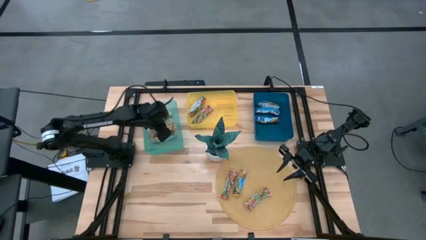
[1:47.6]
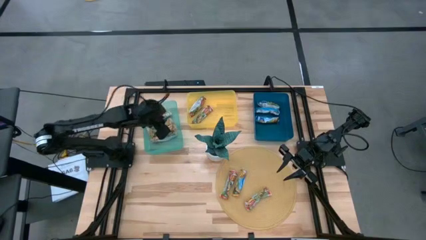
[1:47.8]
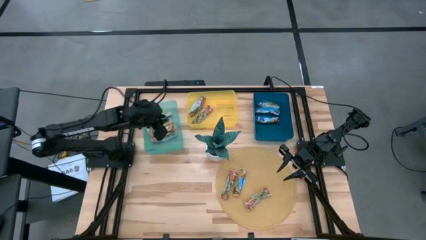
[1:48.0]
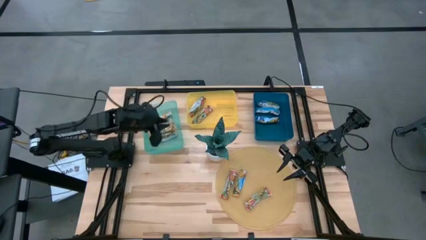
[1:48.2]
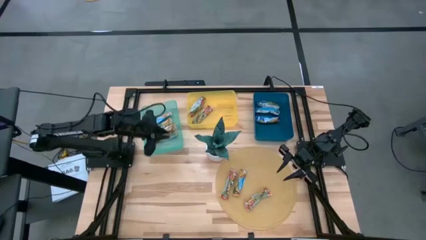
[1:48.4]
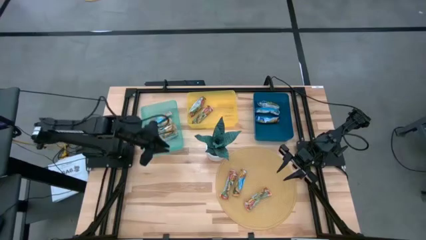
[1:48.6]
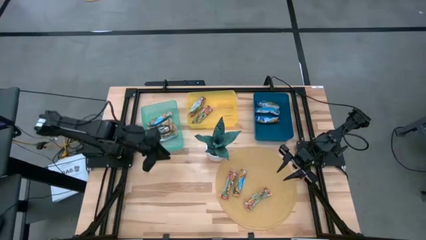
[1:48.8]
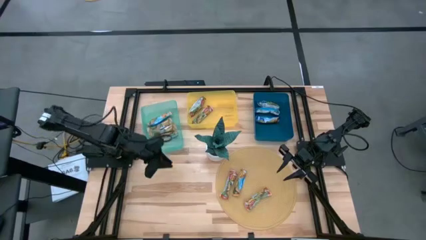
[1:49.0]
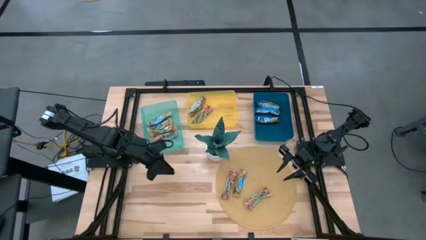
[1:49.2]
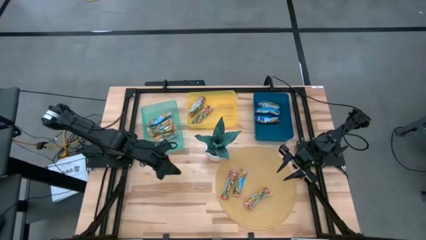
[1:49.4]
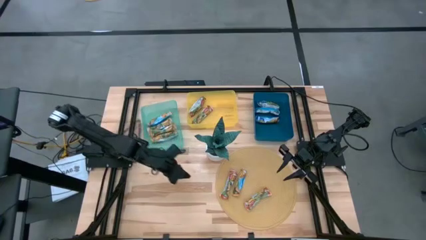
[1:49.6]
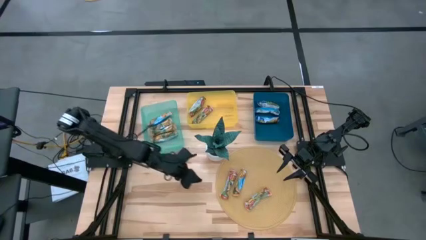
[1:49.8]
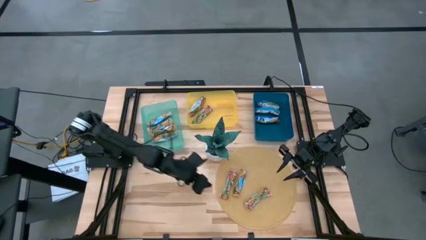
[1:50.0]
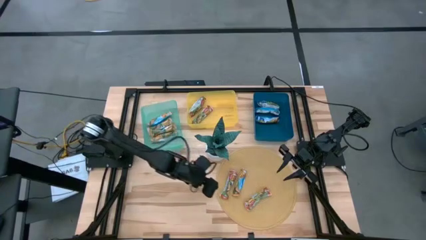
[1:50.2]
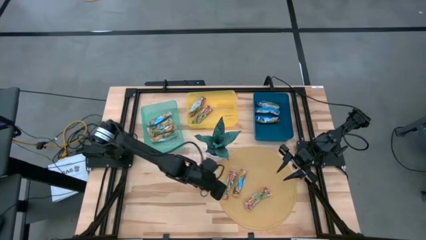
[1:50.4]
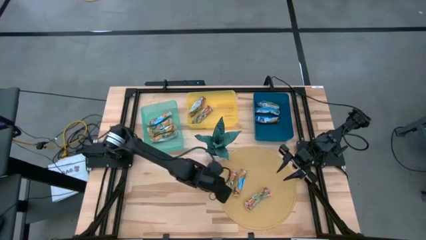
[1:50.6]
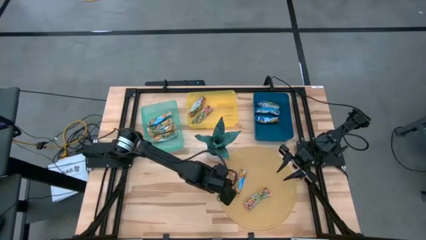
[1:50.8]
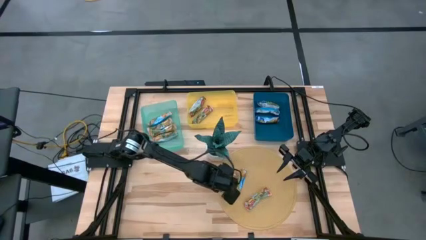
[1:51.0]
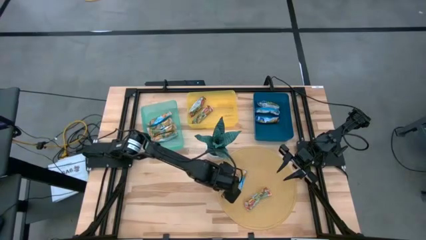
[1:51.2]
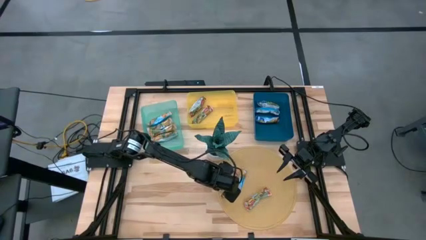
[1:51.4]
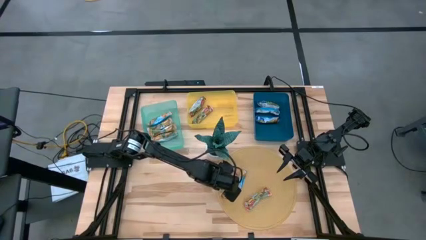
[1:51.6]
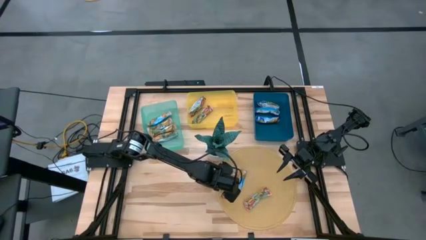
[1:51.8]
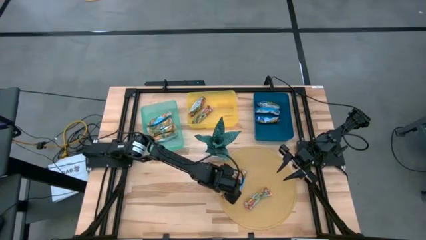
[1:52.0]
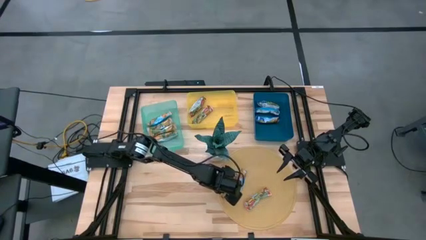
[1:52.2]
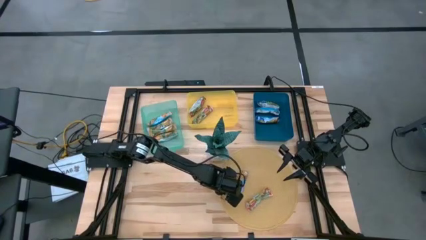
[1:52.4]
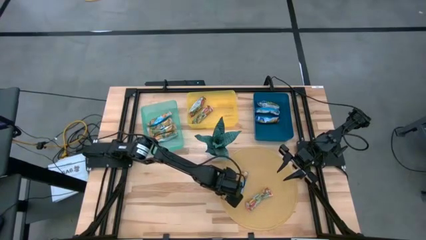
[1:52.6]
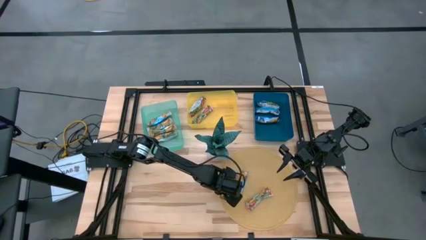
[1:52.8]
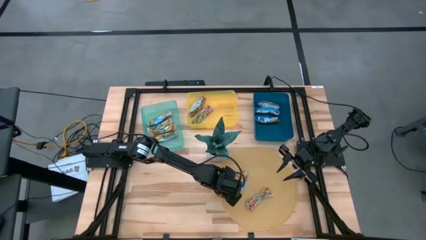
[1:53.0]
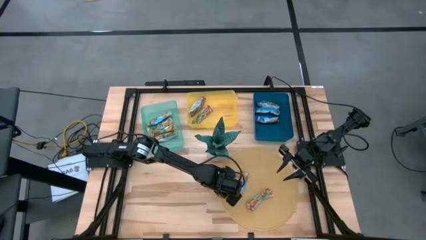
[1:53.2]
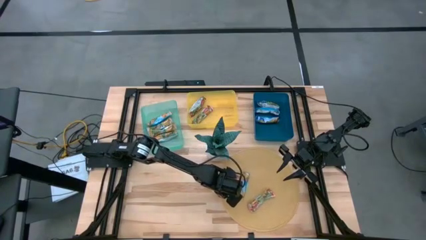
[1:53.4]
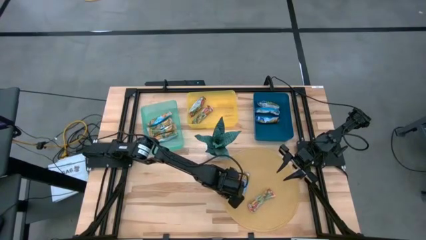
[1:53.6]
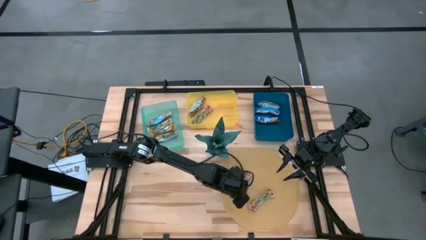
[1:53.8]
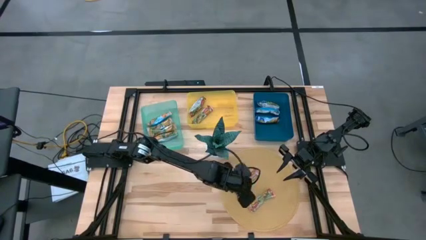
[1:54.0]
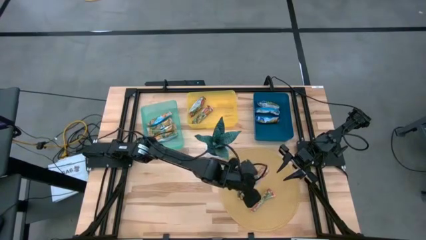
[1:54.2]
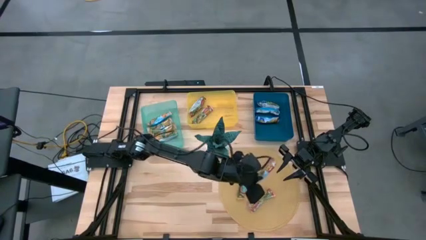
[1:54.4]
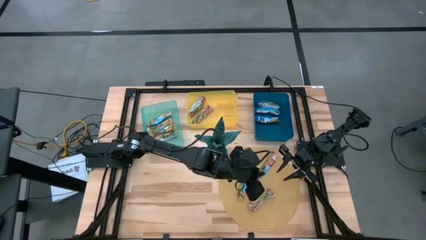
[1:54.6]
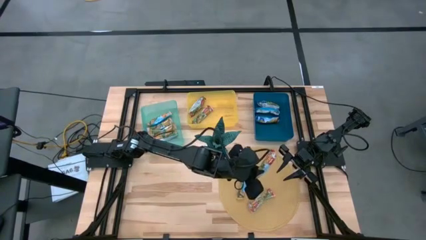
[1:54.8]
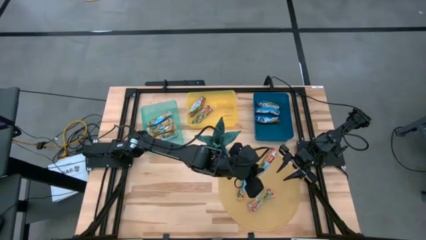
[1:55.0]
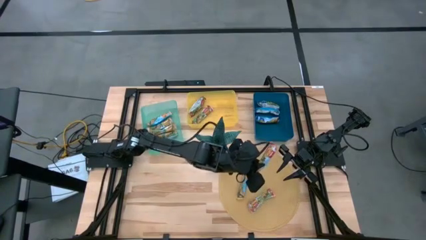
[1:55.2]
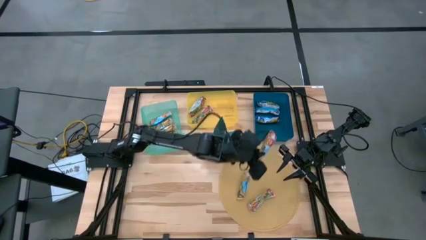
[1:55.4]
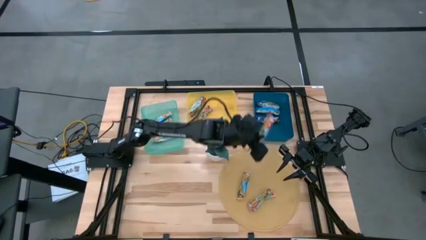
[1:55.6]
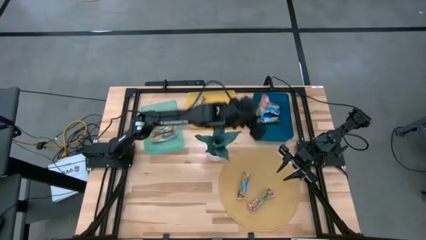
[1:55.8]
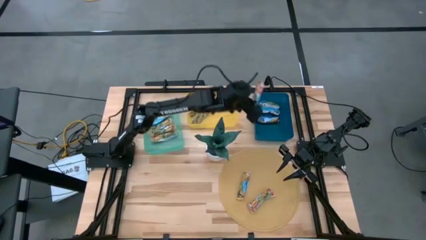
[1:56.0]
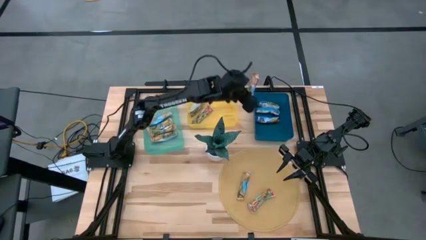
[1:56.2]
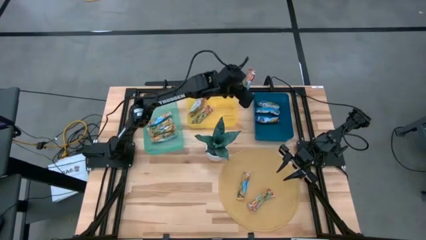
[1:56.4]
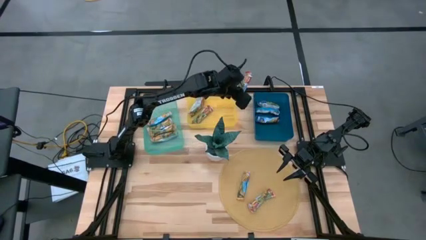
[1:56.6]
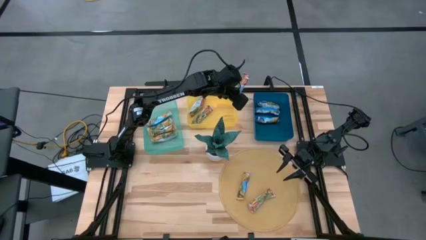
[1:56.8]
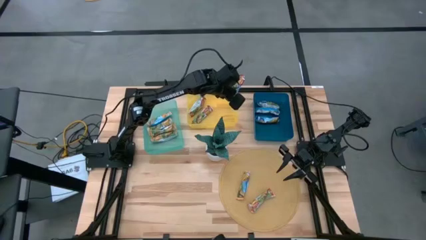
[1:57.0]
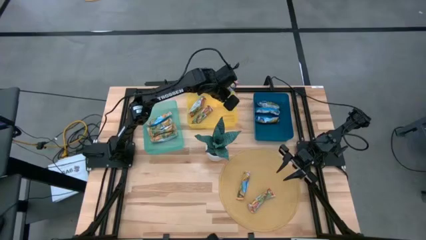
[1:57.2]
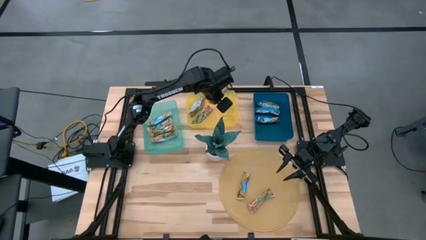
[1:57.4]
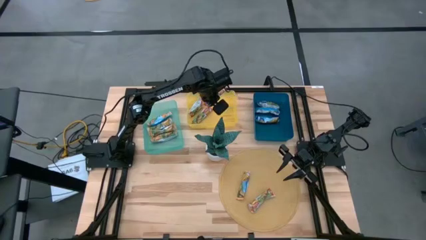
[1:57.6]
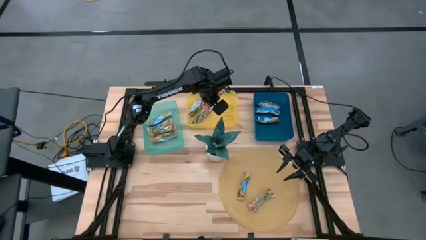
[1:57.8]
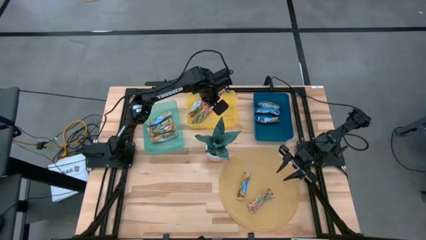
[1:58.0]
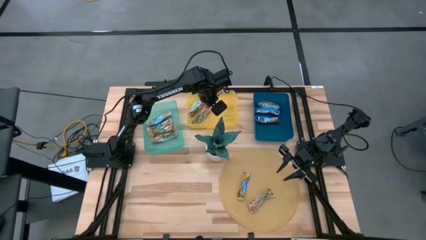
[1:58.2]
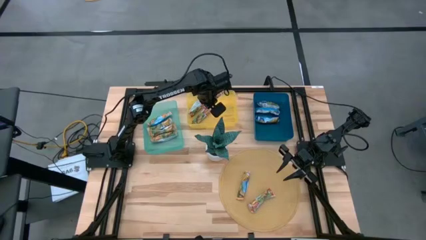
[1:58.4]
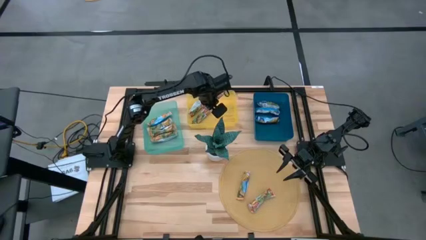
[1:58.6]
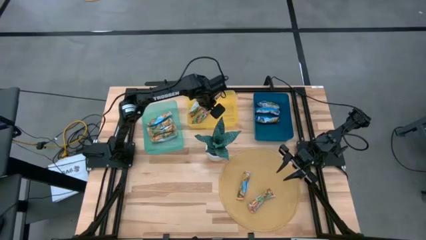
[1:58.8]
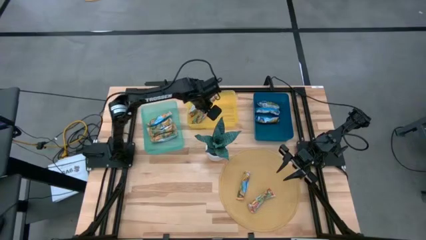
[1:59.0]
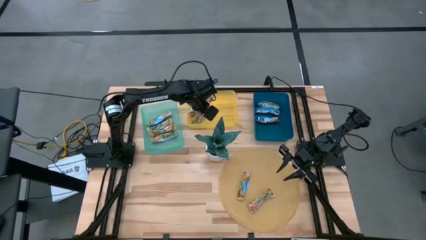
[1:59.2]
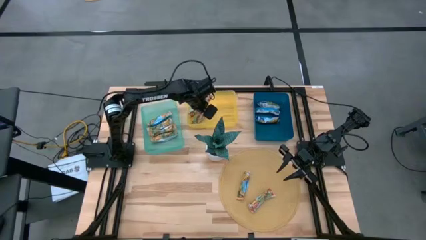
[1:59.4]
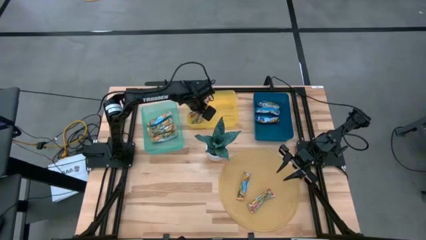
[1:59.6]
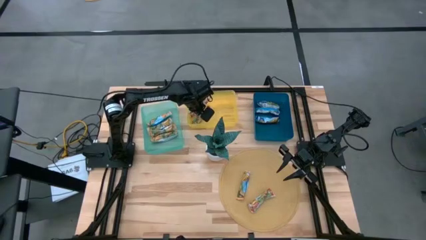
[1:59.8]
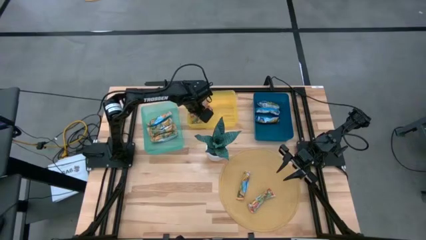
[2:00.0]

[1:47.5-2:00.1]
Task: Pick and place Granola Bars by type
Put the red granola bar into the yellow bin
